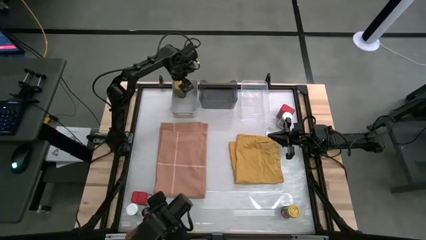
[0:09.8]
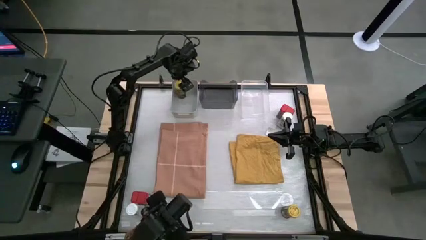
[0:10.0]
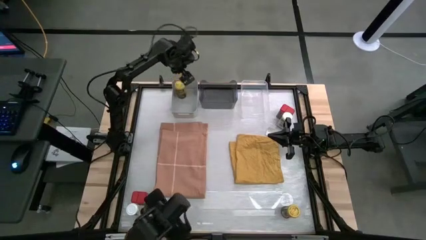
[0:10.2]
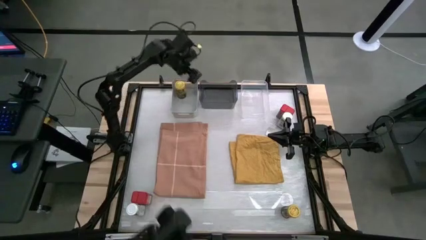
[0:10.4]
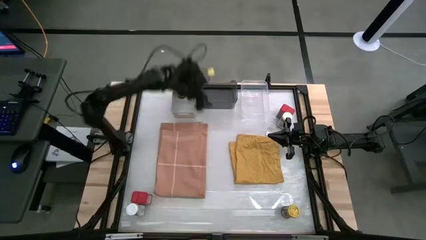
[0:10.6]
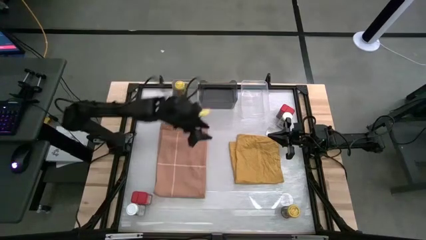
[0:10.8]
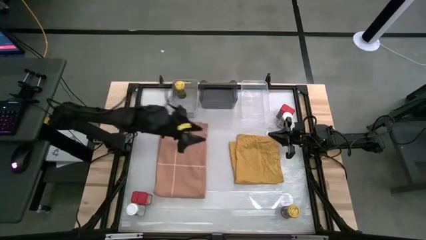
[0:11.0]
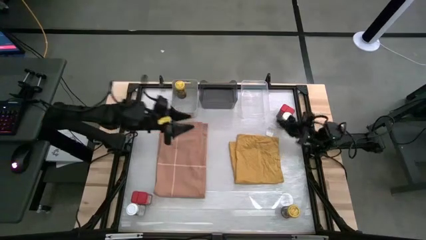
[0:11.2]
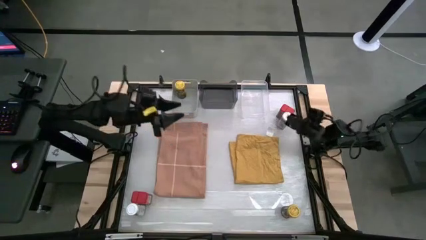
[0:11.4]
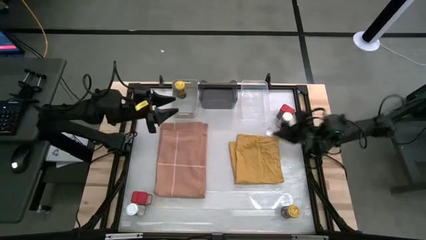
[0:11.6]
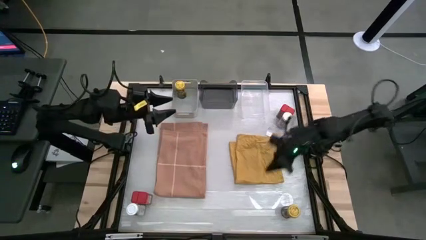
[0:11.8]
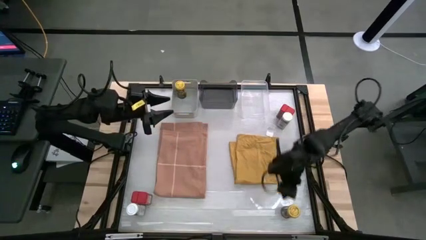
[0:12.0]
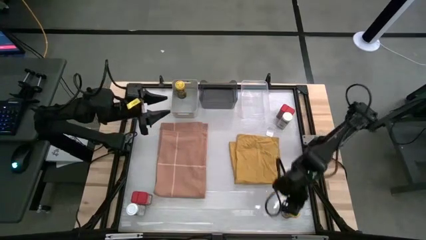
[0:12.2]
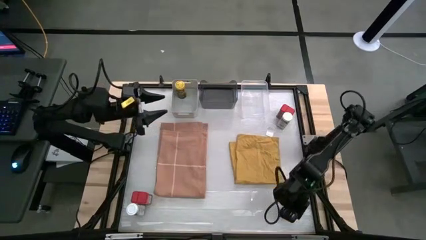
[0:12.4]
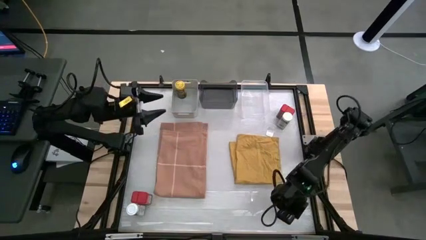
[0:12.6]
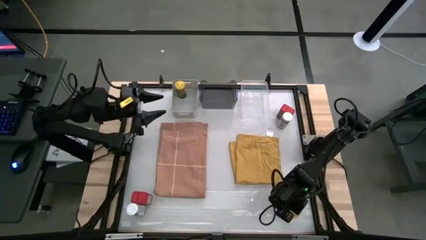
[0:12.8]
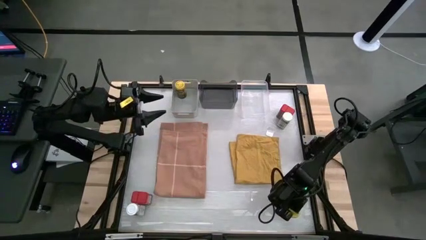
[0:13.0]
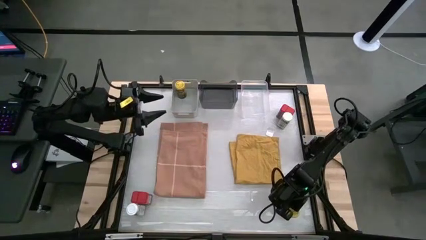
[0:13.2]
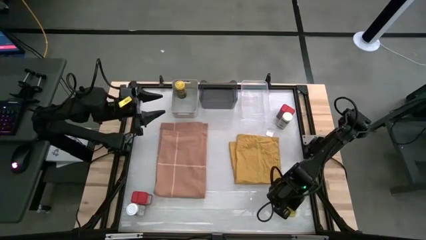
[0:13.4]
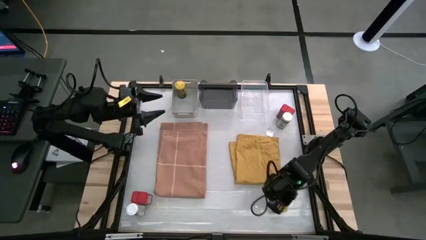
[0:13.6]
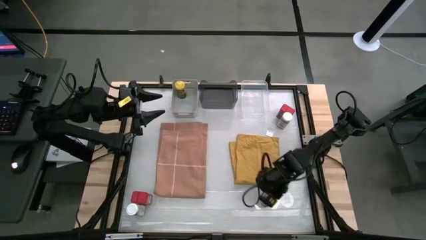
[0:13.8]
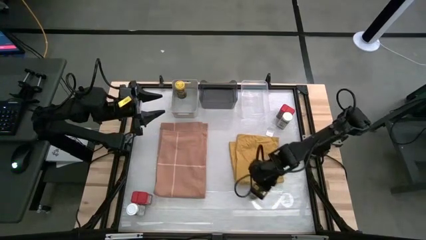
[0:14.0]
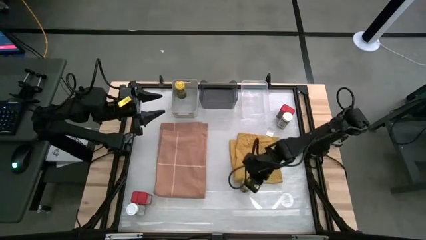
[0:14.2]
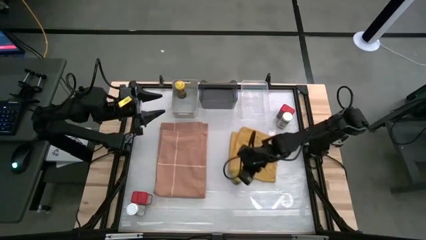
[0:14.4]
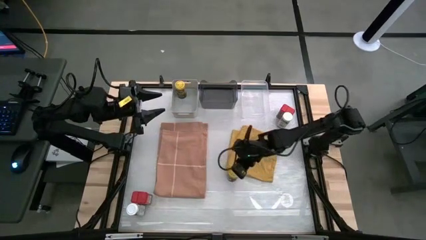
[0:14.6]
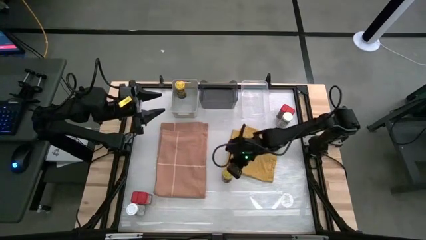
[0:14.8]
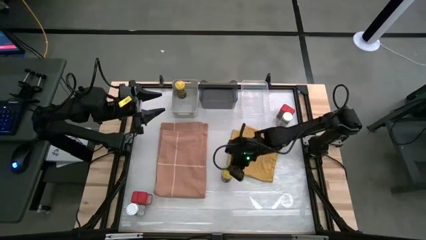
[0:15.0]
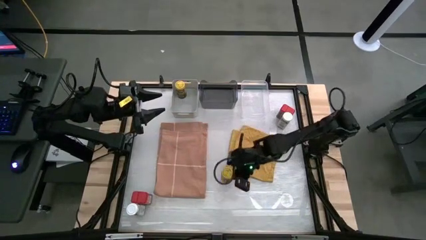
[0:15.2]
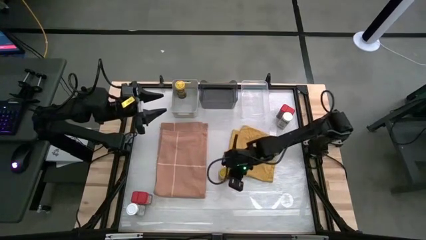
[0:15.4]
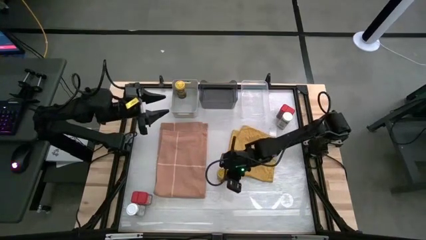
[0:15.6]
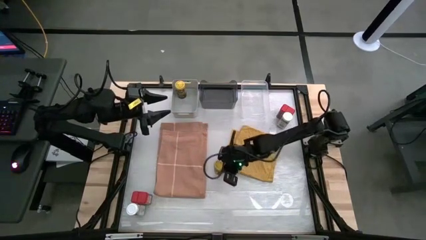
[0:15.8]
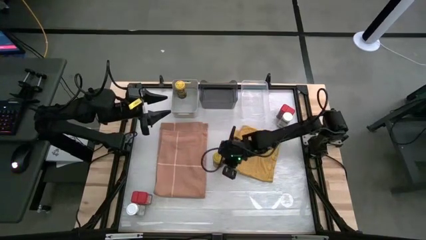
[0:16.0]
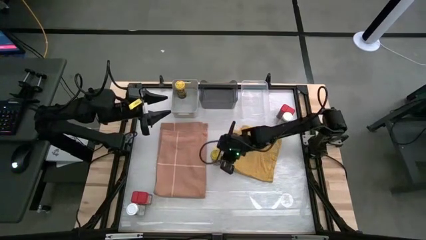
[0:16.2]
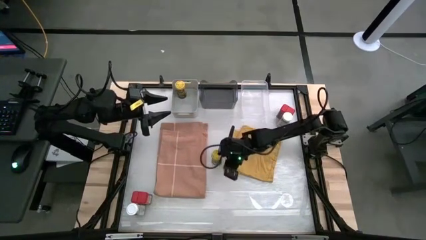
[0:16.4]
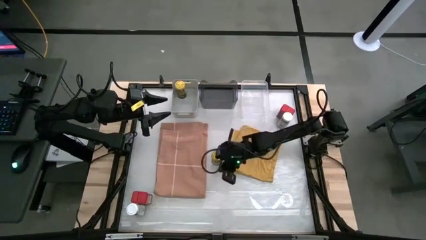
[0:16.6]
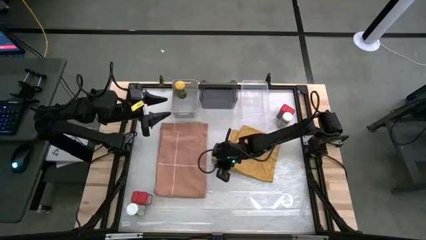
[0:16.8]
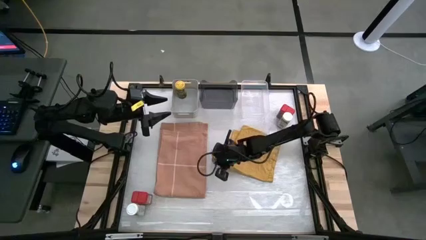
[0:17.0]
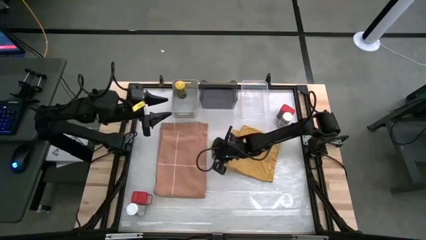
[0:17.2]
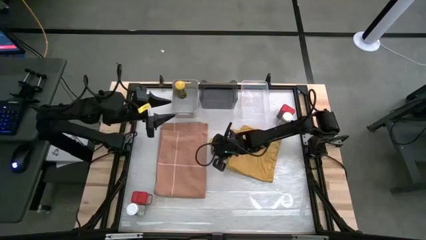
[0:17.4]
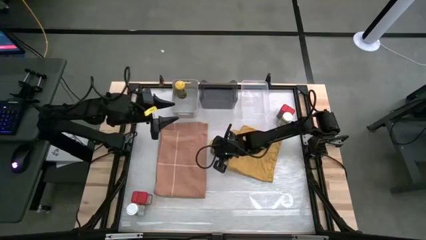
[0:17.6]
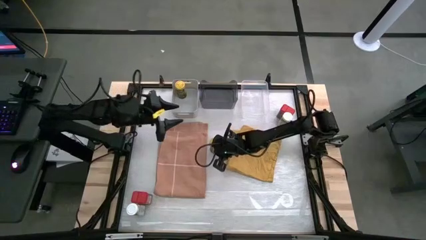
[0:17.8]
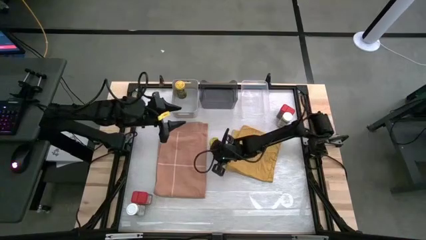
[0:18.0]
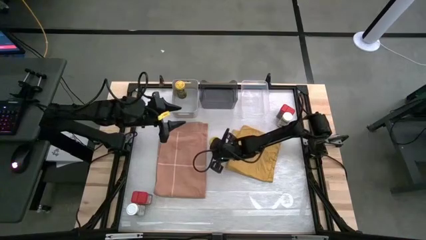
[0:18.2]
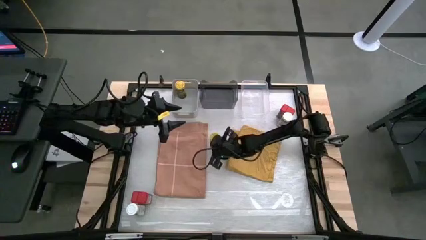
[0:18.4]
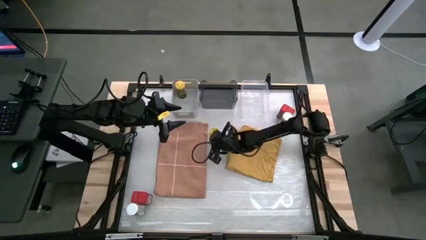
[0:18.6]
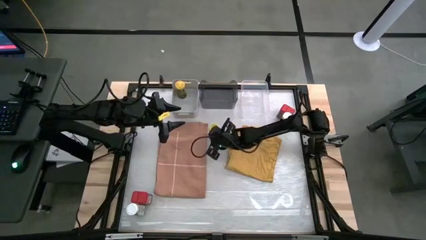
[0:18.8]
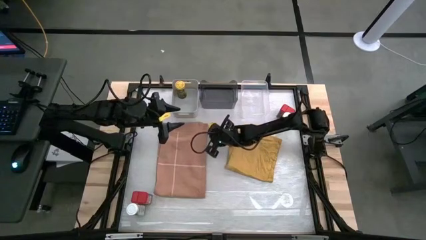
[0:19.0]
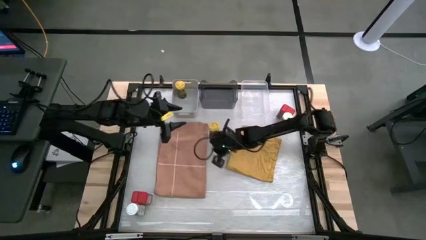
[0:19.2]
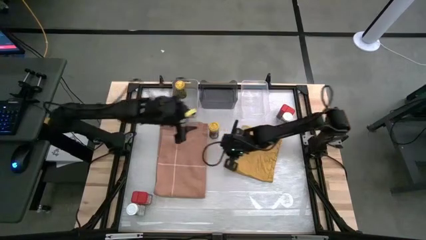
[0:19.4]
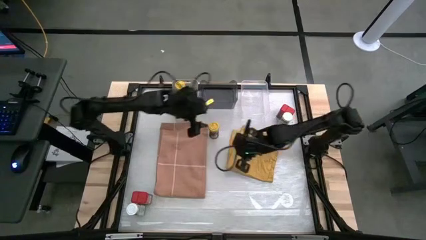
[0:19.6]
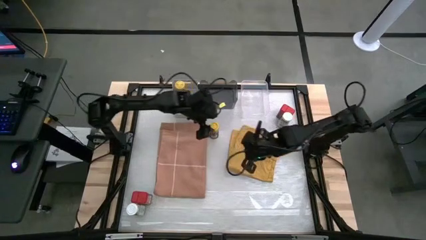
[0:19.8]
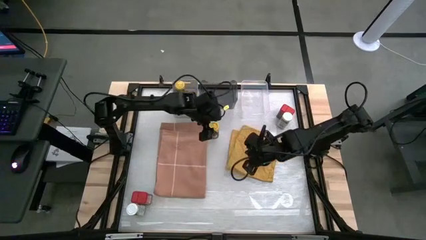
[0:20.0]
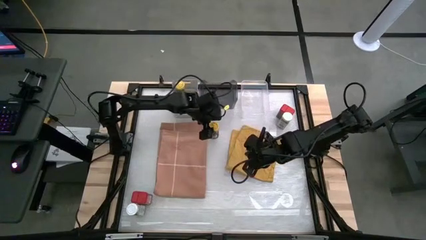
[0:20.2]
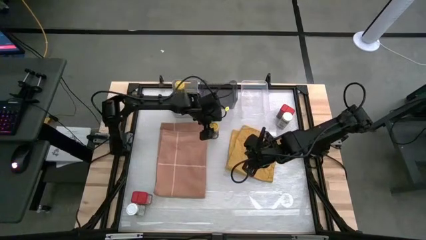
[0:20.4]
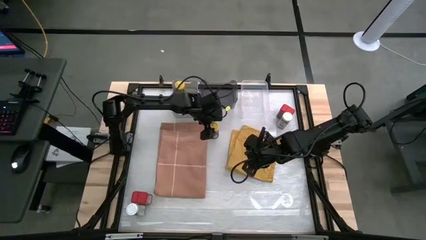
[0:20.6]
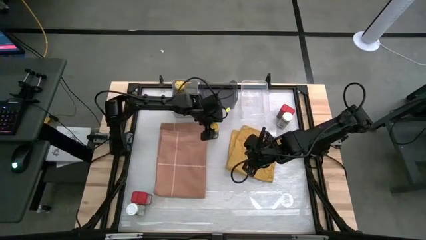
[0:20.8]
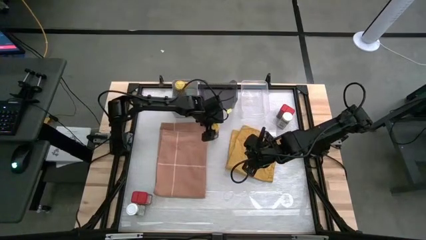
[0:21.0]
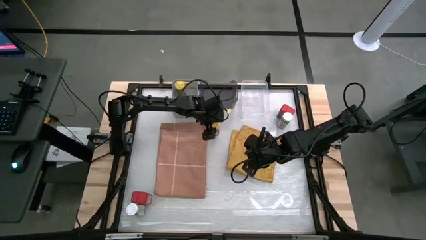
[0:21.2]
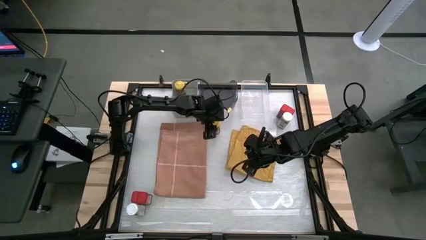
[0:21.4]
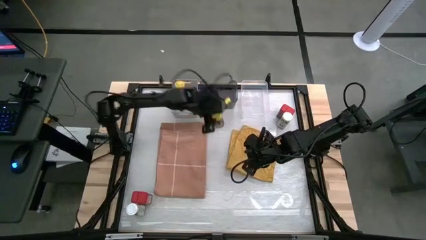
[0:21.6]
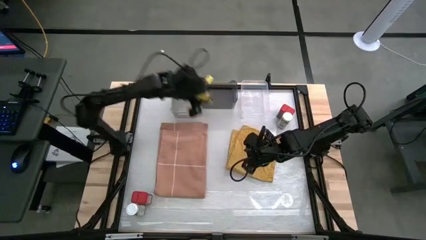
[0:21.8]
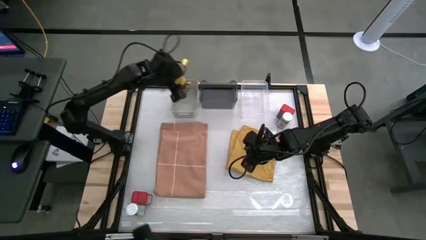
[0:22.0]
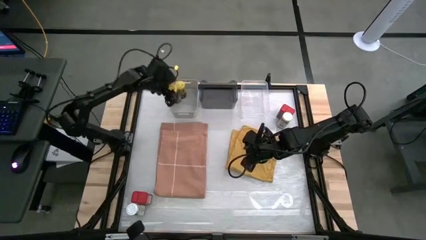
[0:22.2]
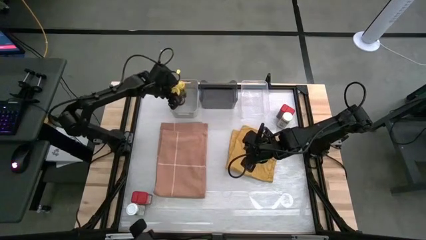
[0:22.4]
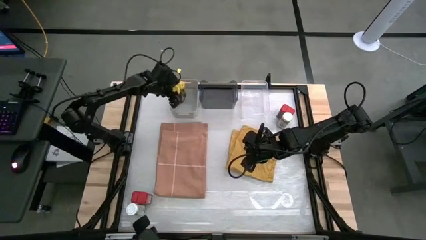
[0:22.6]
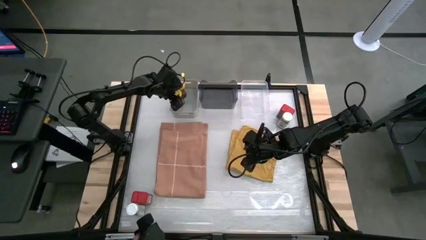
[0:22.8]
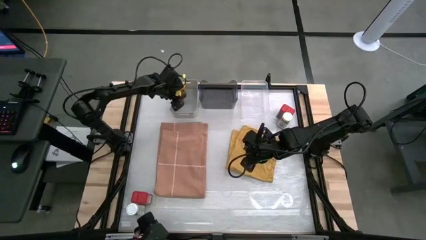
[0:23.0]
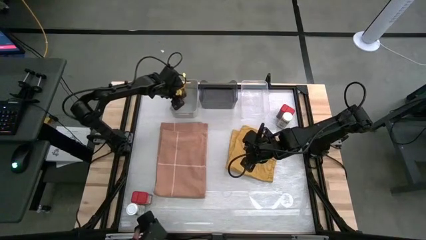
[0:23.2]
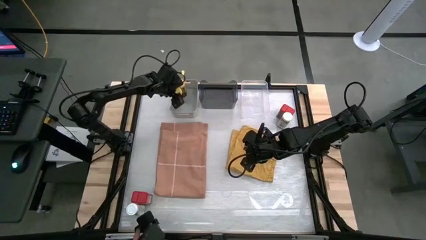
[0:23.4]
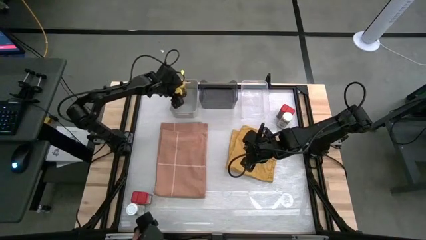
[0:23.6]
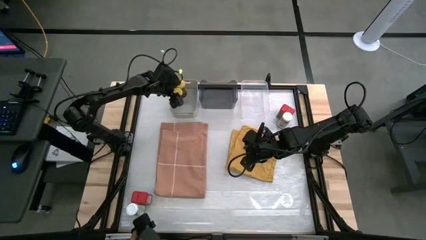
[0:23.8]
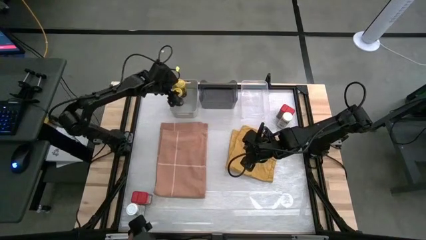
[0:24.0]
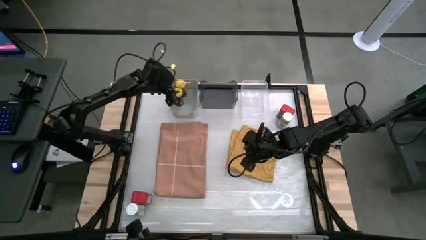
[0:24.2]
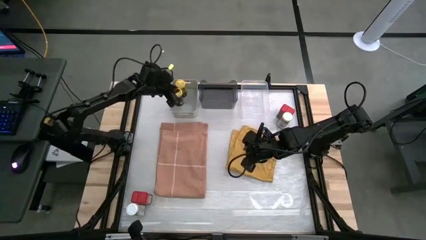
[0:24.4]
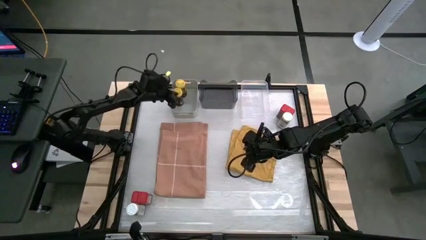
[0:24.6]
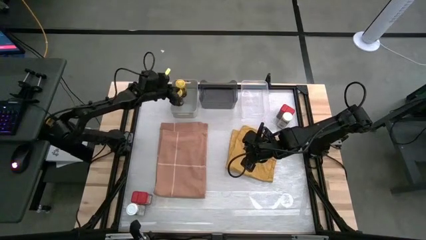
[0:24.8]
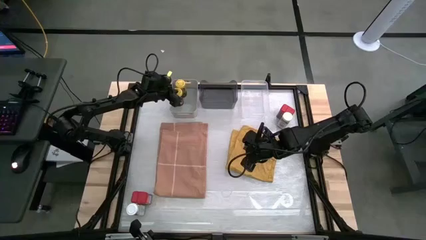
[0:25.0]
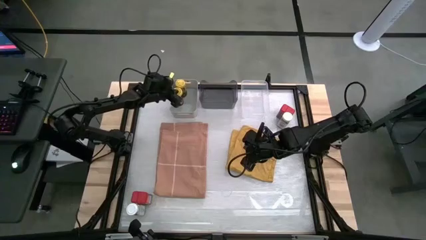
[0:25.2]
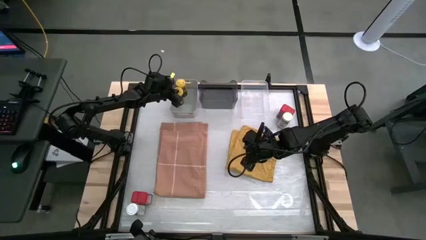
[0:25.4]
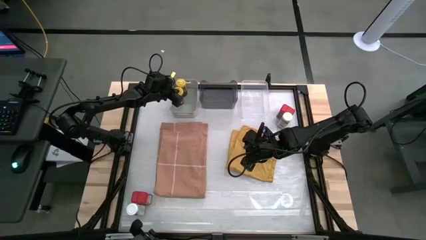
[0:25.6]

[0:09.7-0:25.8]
Task: Sort spices by type
Put the yellow seasoning bottle into the gray bin
